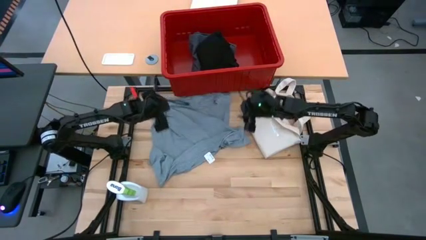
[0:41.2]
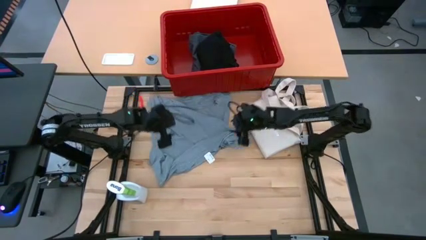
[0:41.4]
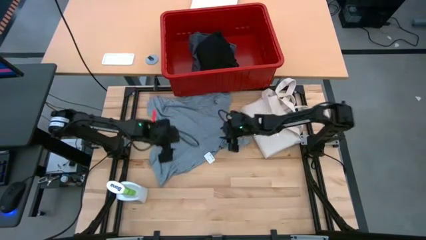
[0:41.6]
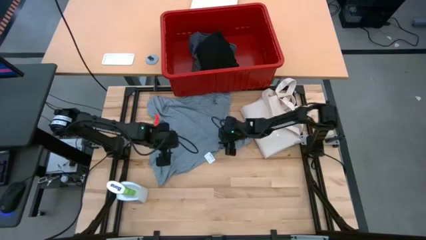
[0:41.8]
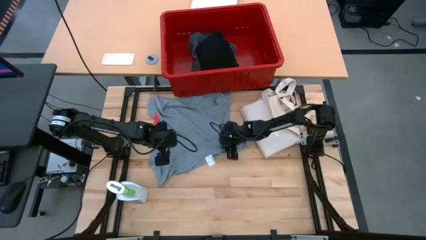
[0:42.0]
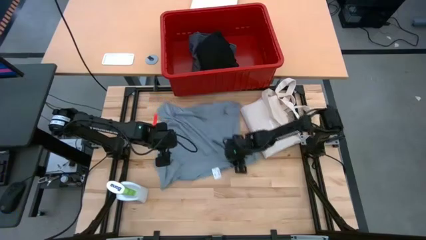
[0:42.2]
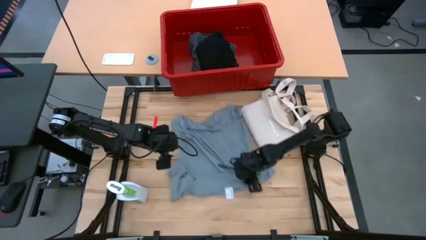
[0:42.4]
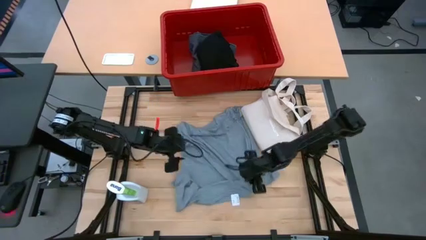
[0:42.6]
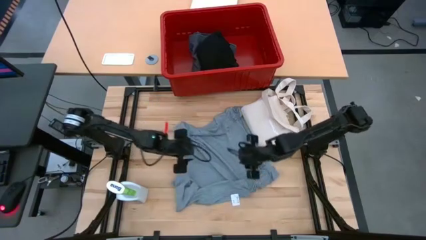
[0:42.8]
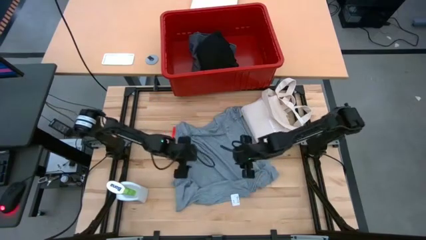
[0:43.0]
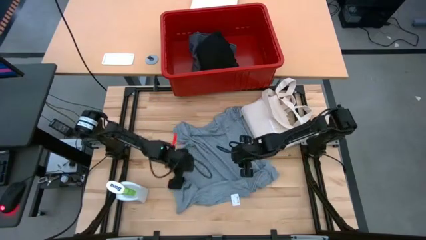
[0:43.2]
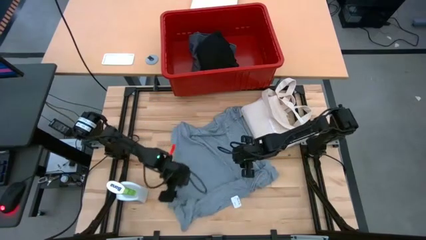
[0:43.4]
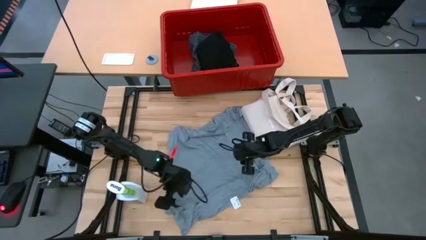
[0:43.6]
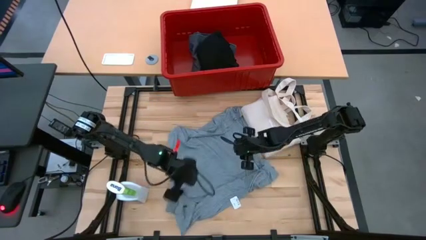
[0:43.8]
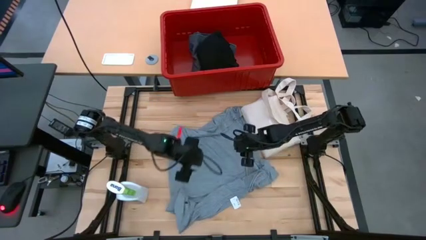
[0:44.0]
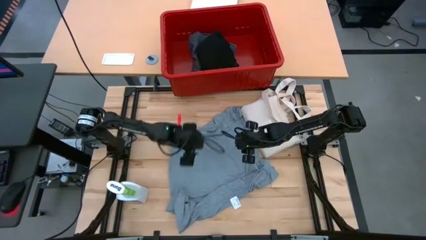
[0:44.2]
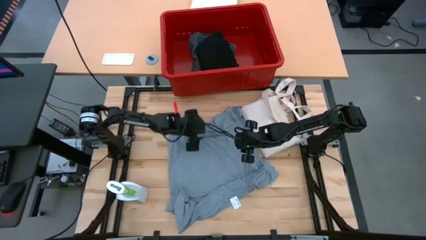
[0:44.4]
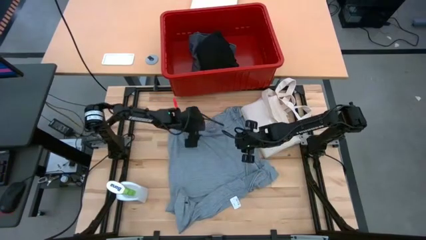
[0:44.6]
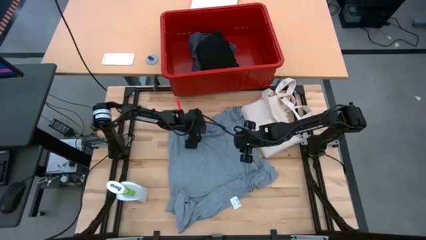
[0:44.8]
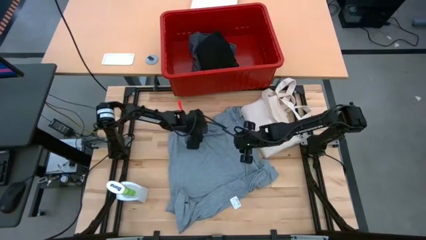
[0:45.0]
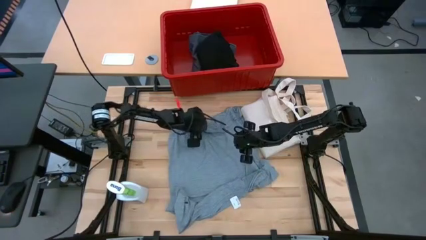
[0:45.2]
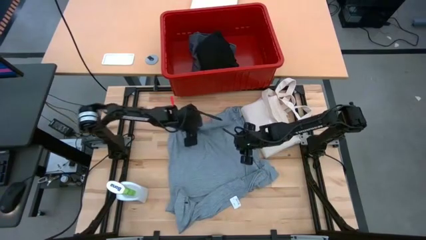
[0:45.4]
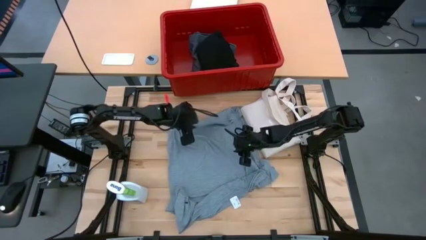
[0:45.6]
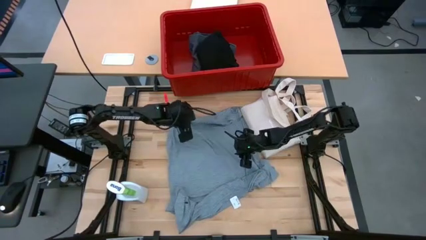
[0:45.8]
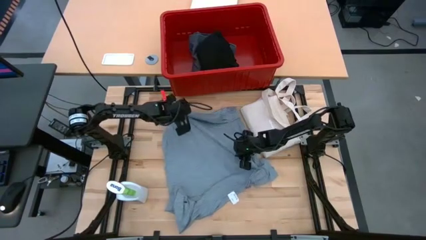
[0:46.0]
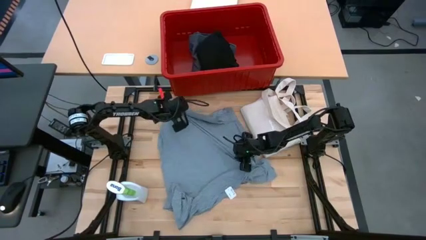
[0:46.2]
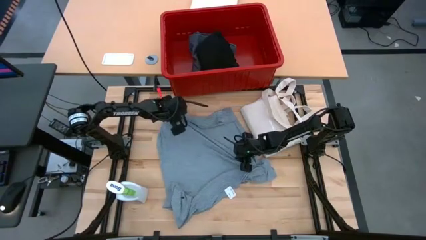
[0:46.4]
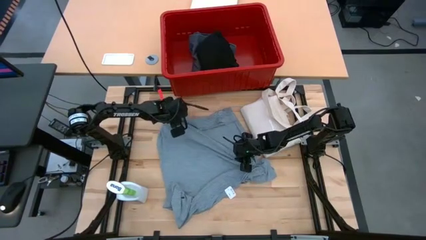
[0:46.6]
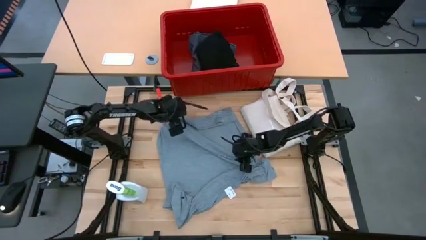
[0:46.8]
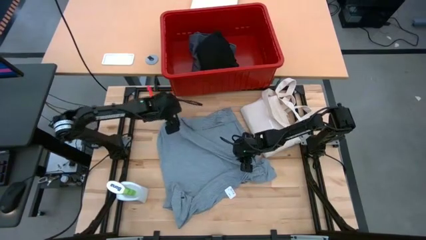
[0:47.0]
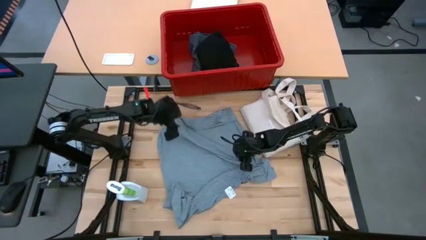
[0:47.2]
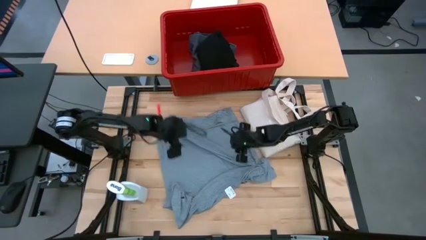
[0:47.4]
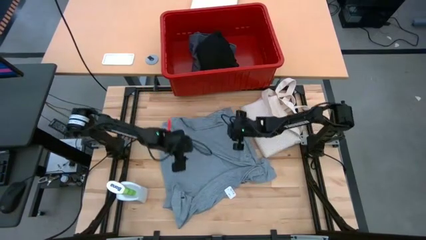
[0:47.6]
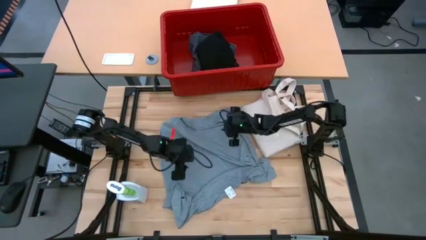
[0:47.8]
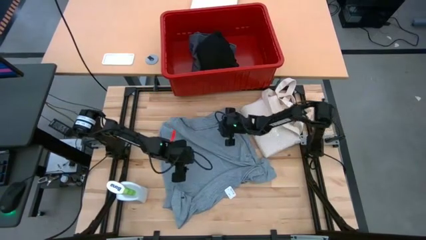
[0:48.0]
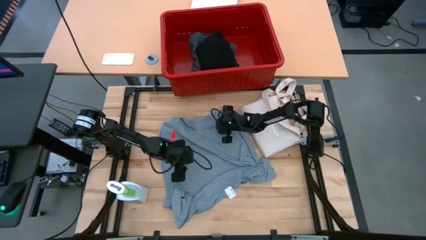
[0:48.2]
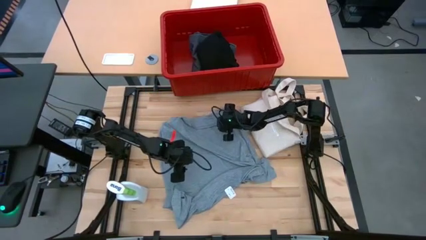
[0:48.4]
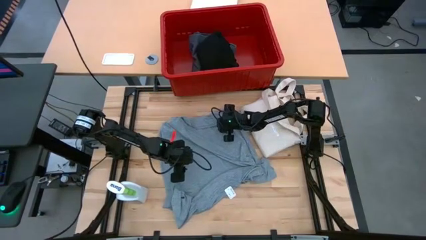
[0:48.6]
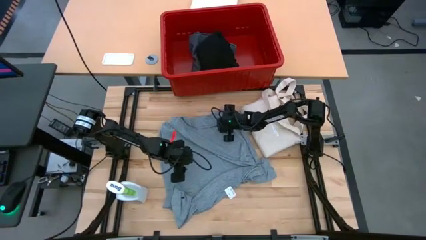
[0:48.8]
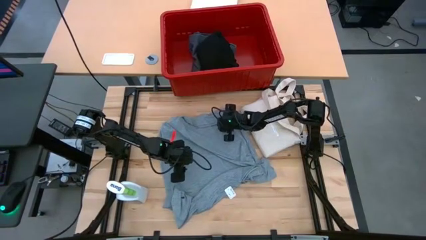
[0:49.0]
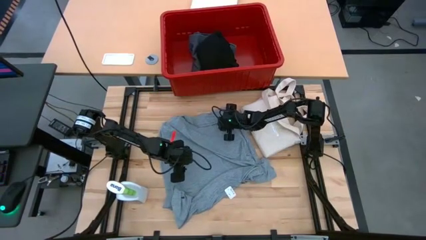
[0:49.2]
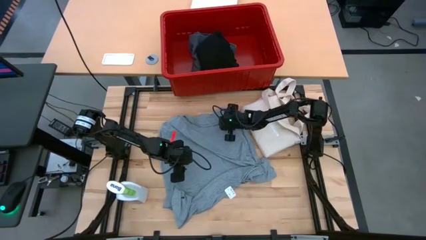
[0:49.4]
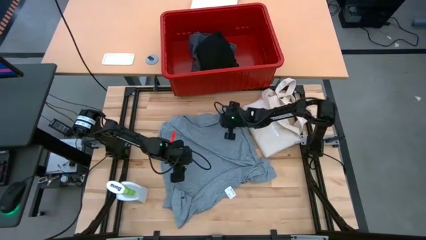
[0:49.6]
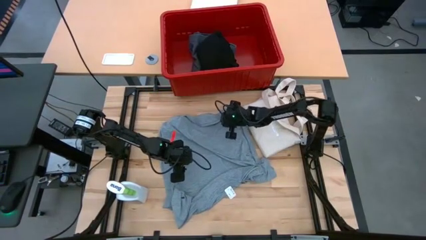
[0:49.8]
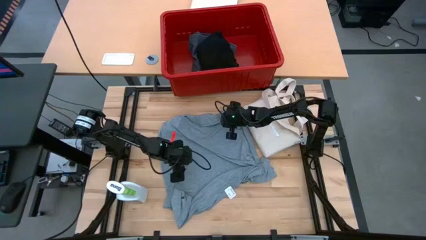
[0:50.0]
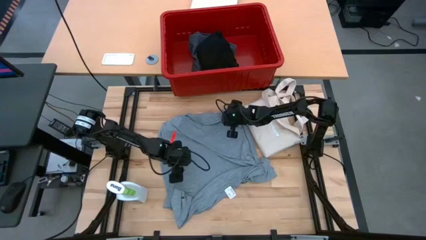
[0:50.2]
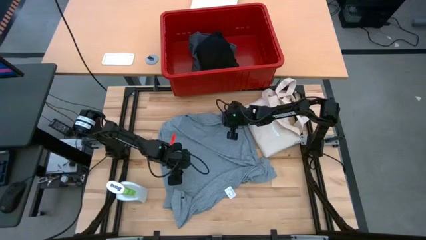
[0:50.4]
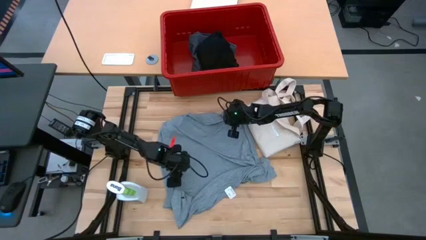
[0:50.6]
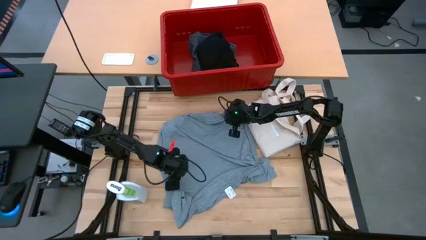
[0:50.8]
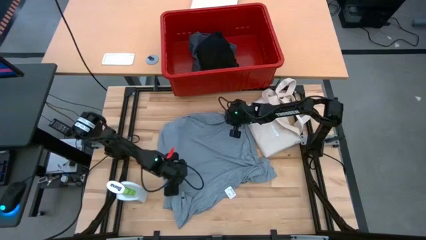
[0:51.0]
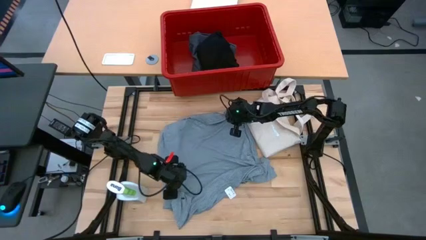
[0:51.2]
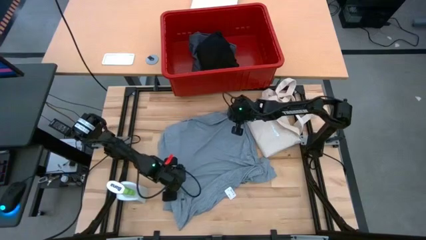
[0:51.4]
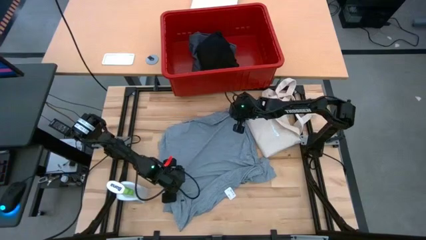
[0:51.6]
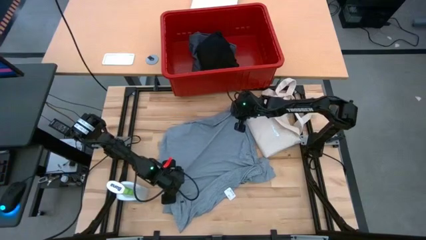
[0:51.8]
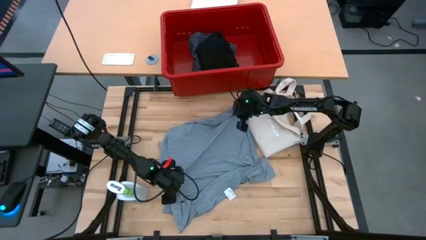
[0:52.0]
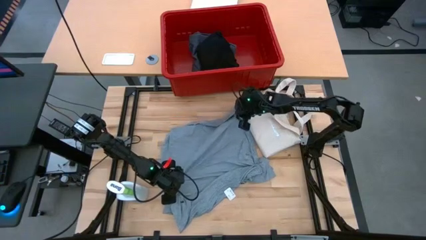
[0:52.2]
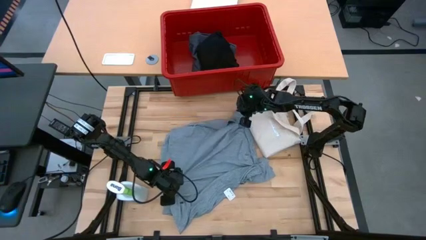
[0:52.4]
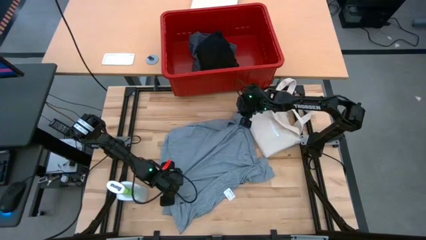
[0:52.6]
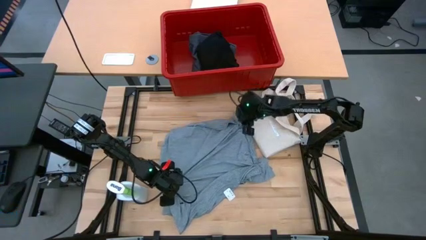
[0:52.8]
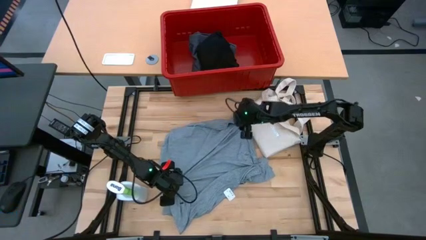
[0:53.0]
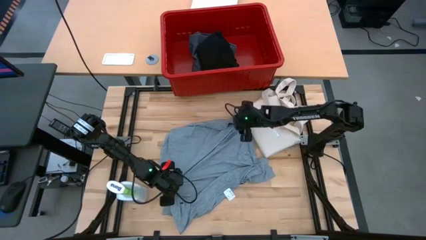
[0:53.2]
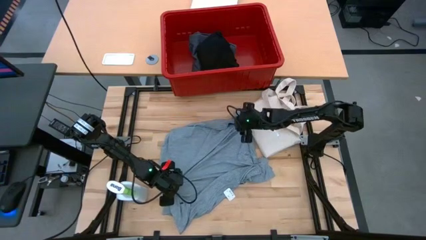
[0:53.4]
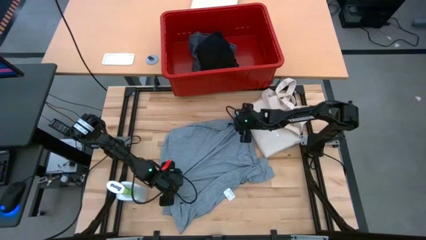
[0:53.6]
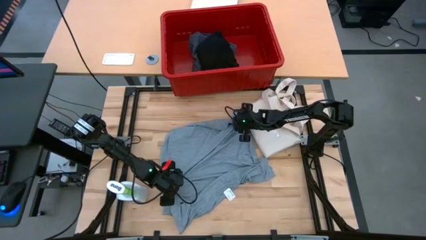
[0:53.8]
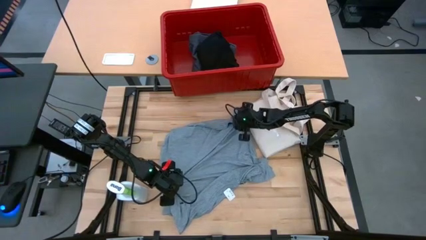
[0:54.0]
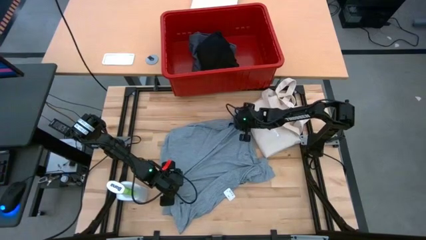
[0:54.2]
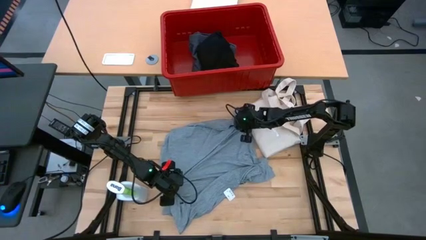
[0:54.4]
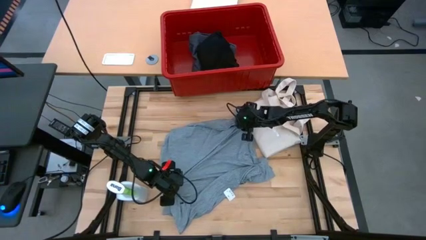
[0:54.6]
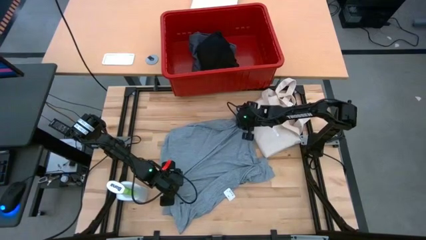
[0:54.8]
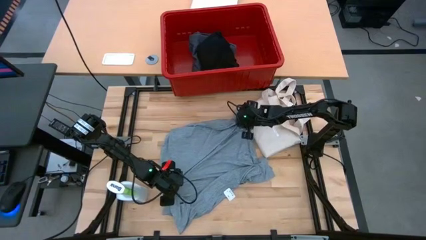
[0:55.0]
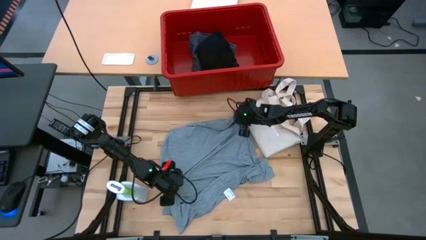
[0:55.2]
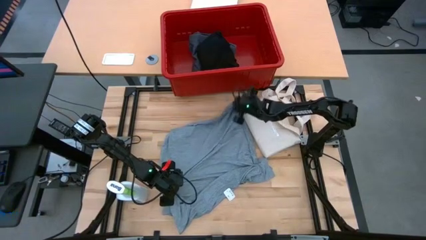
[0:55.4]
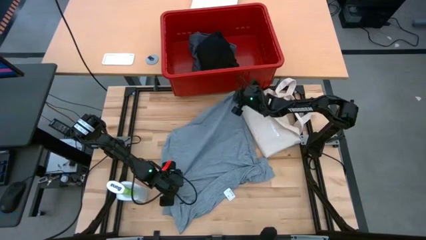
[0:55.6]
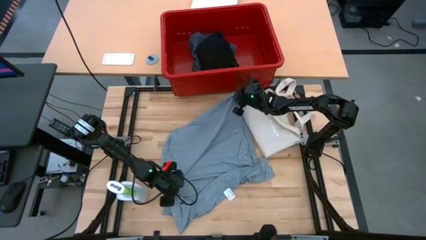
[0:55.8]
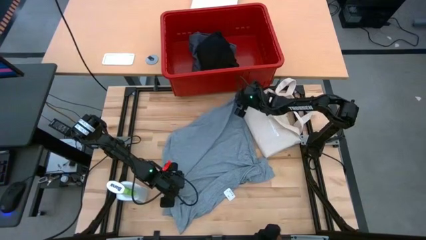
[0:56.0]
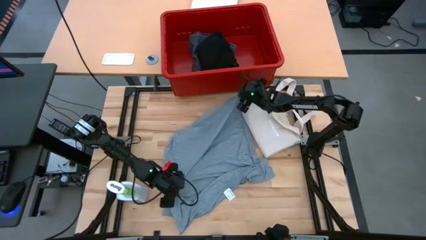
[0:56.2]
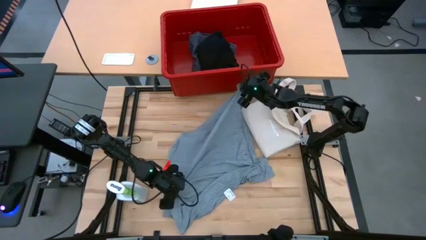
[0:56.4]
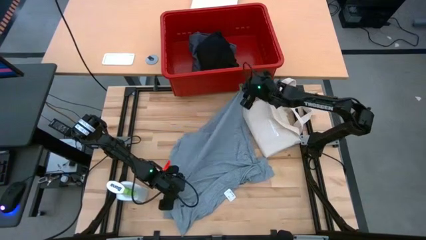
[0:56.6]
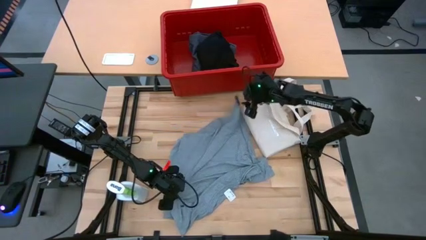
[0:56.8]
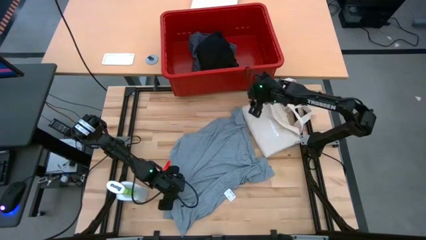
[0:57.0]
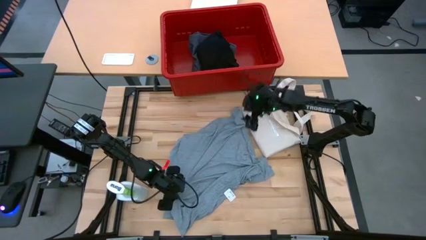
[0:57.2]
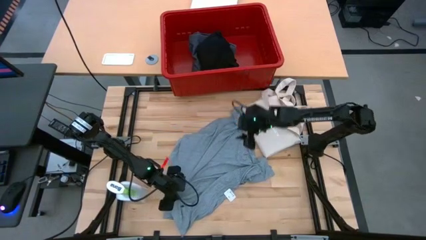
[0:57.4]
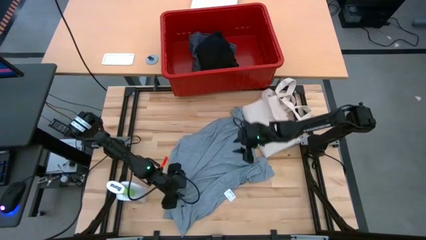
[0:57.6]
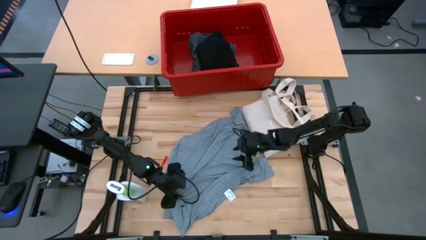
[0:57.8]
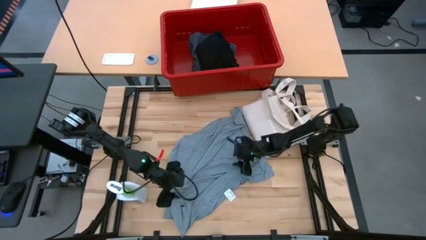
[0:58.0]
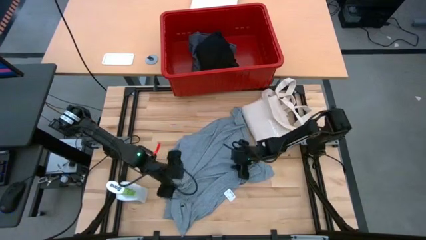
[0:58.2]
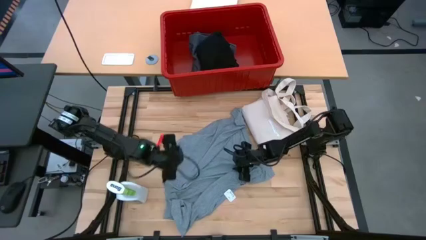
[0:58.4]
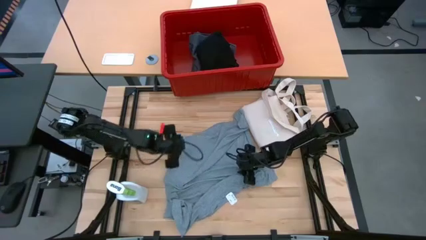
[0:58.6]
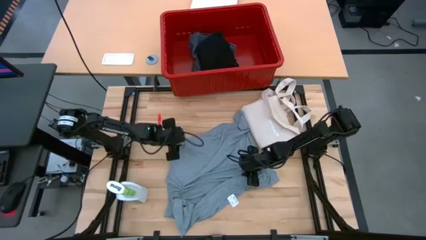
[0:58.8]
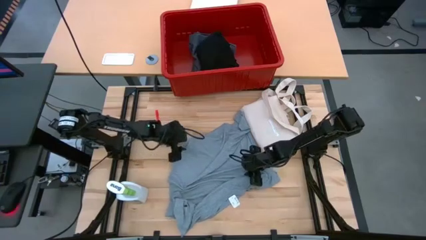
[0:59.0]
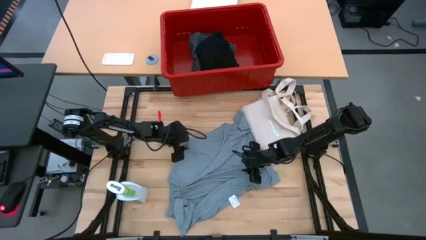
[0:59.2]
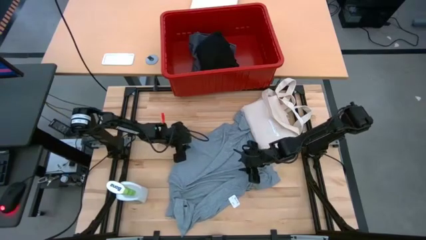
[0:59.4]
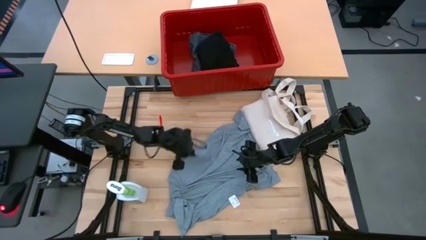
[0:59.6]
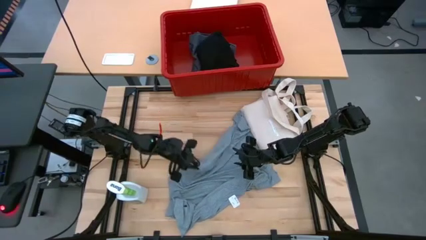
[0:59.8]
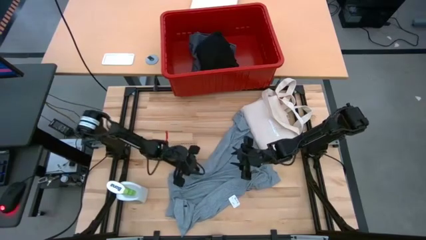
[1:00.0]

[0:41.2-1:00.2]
Task: Fold Laundry from Bin
Fold the gray shirt
